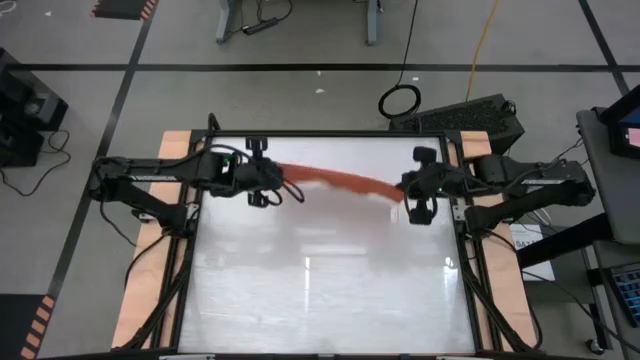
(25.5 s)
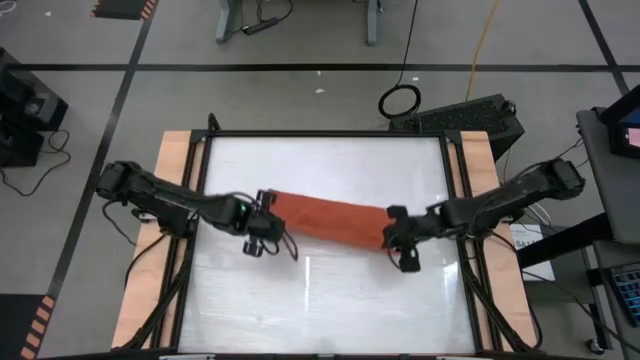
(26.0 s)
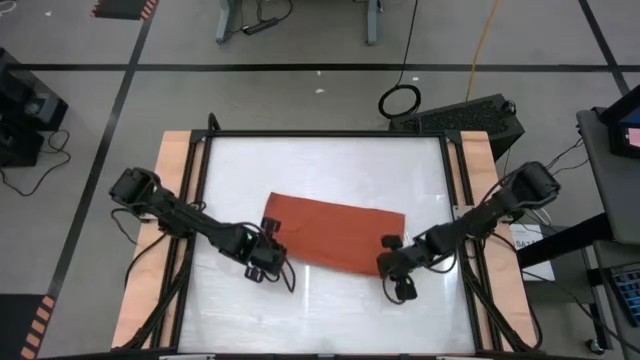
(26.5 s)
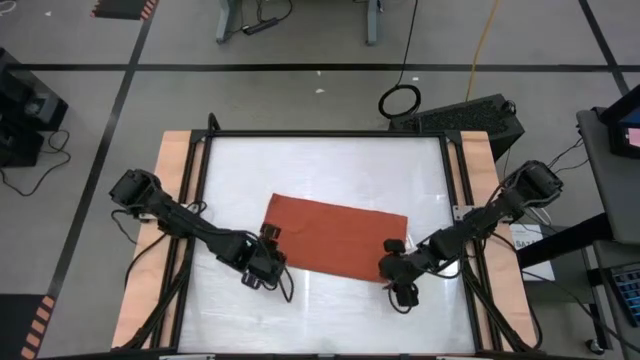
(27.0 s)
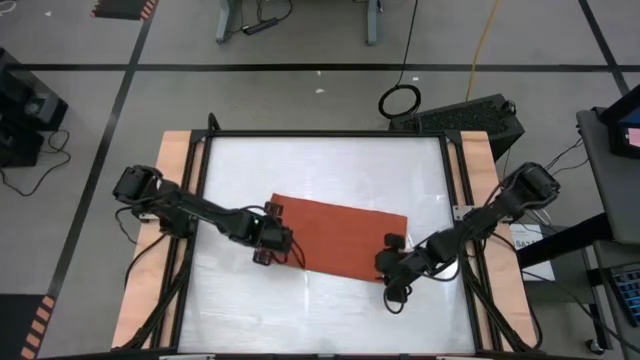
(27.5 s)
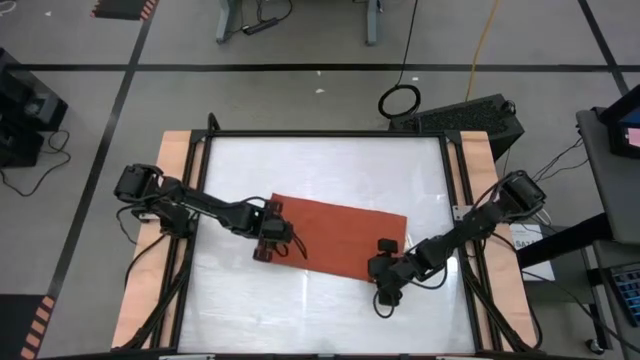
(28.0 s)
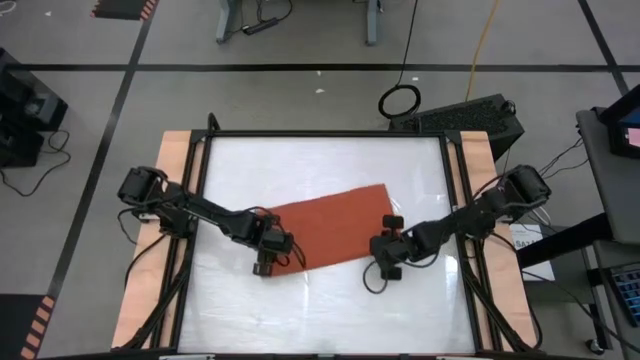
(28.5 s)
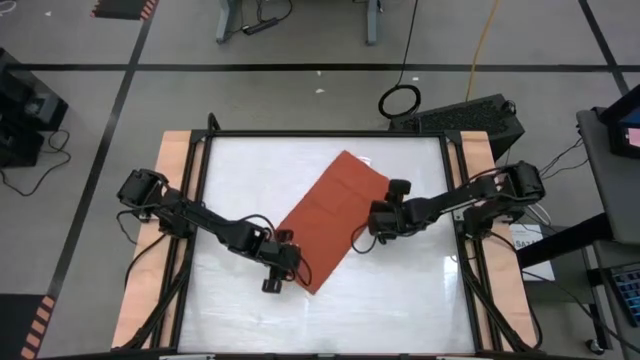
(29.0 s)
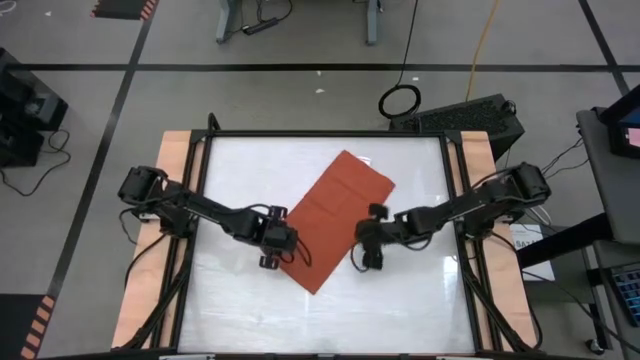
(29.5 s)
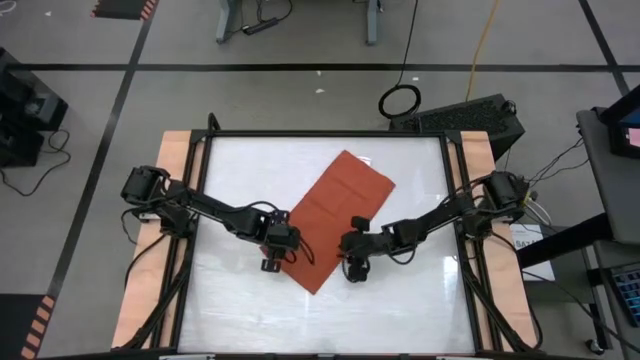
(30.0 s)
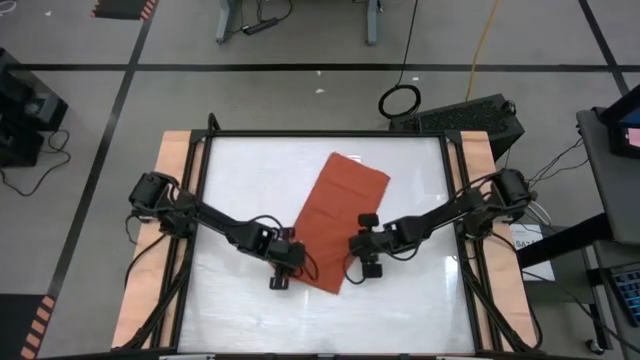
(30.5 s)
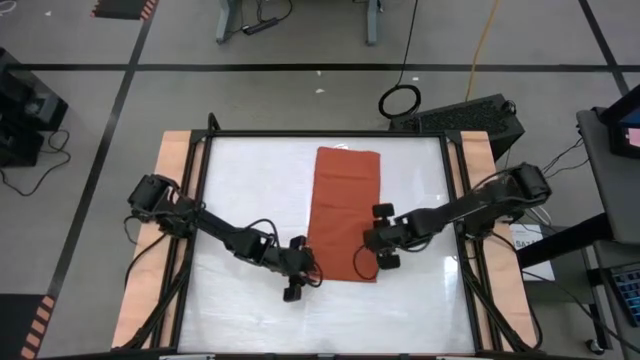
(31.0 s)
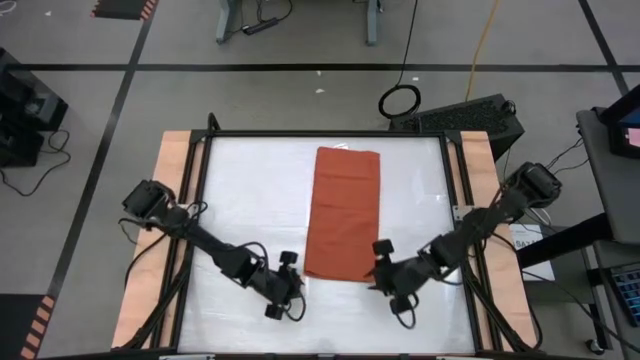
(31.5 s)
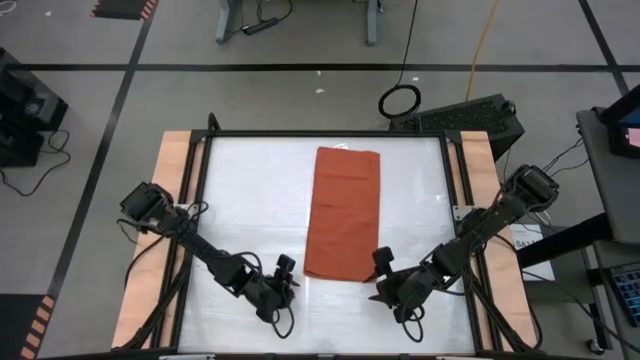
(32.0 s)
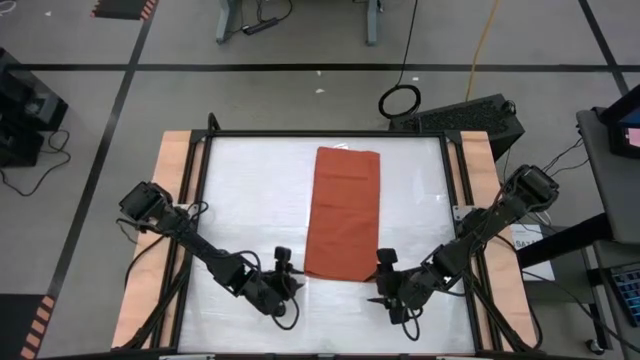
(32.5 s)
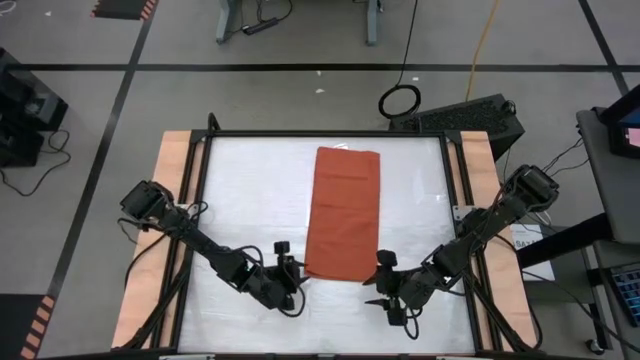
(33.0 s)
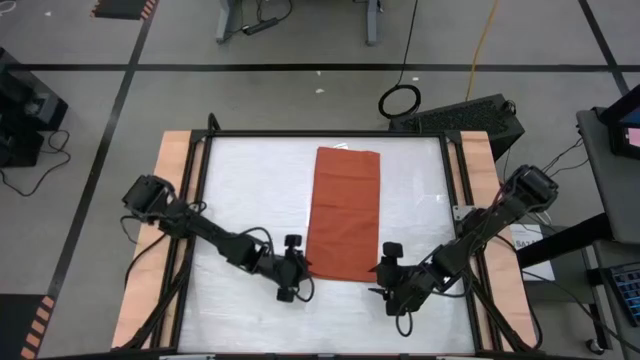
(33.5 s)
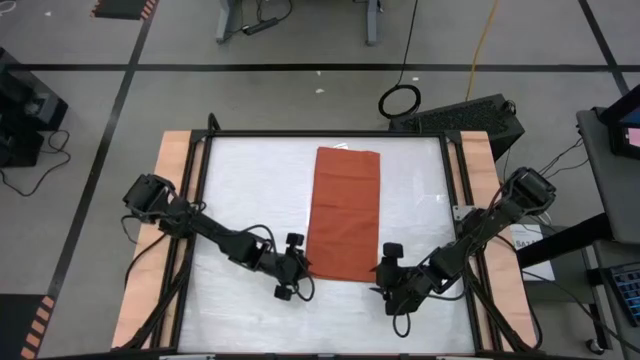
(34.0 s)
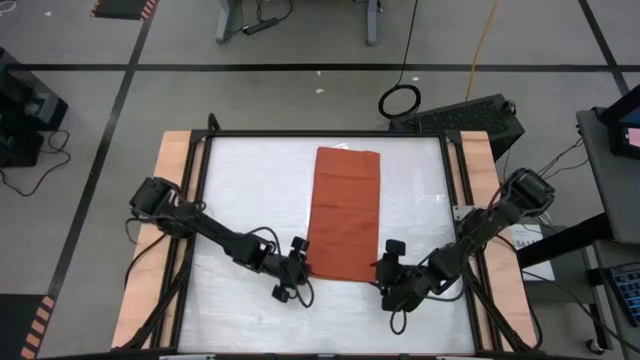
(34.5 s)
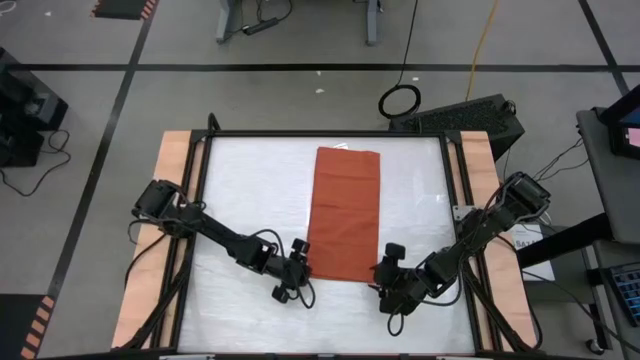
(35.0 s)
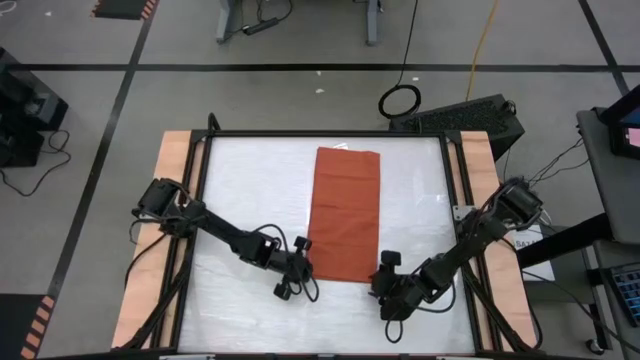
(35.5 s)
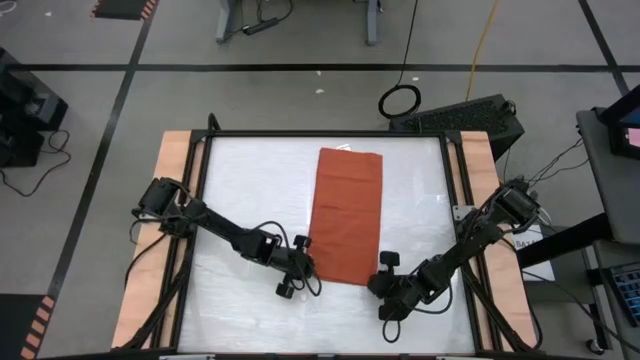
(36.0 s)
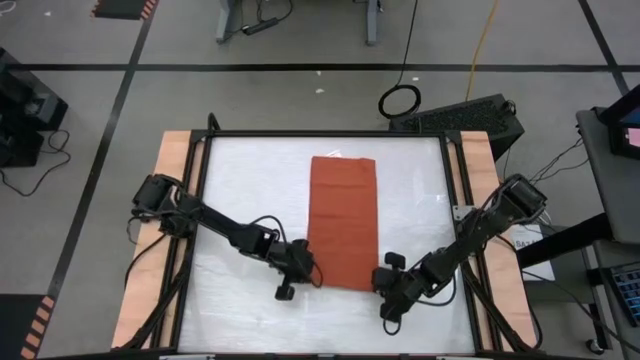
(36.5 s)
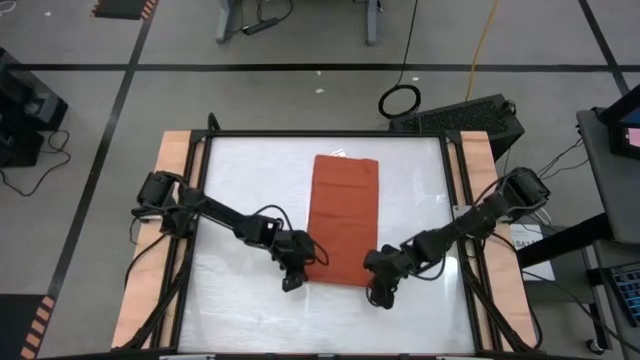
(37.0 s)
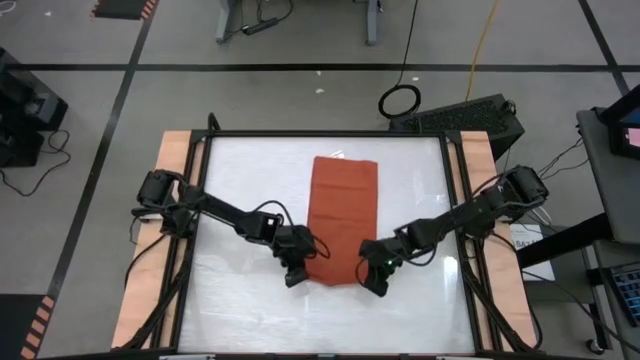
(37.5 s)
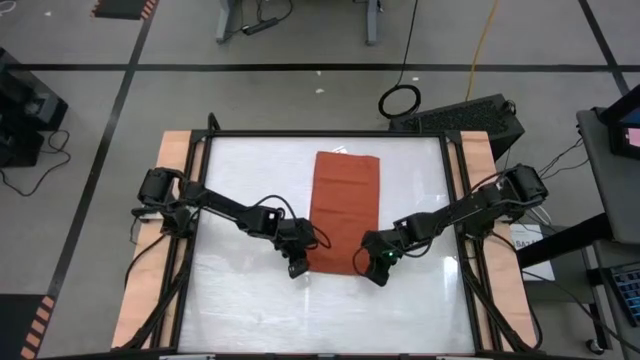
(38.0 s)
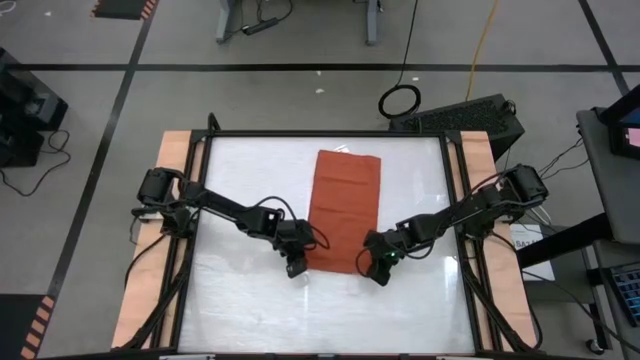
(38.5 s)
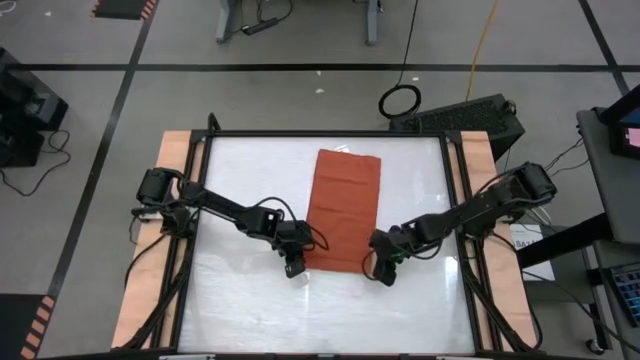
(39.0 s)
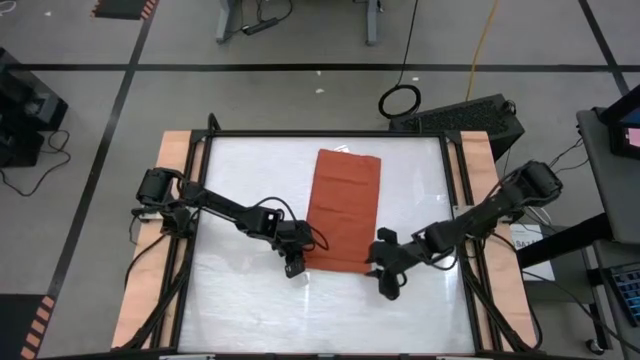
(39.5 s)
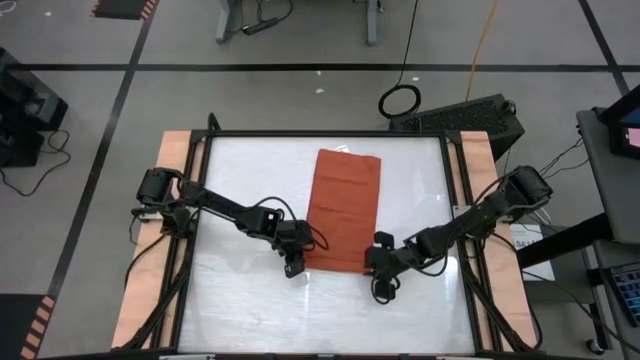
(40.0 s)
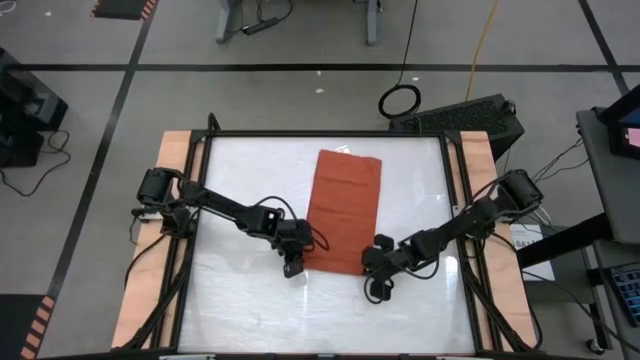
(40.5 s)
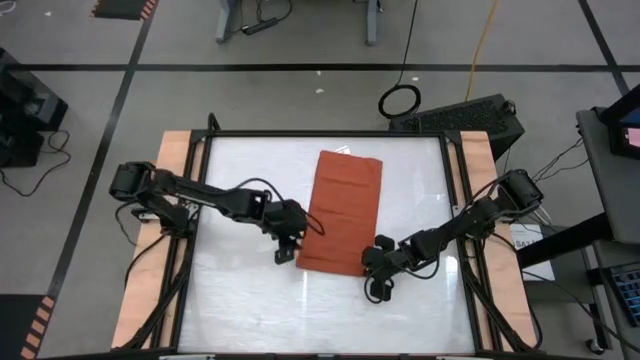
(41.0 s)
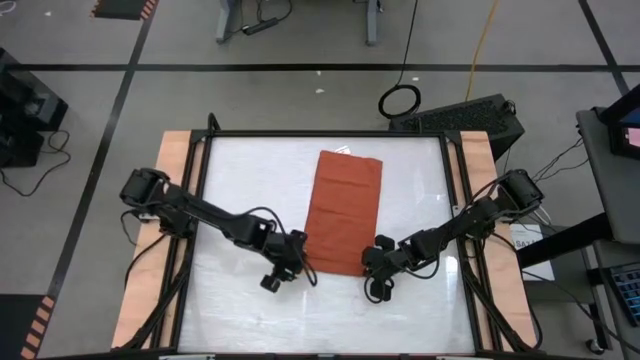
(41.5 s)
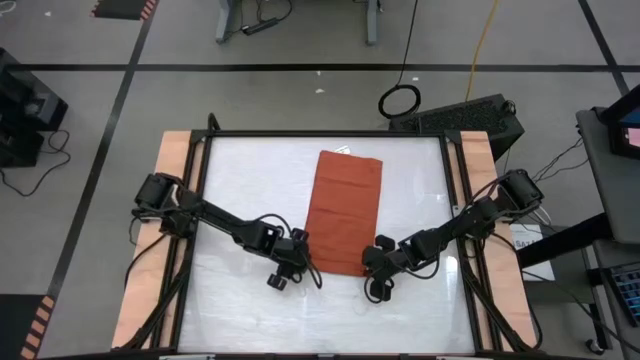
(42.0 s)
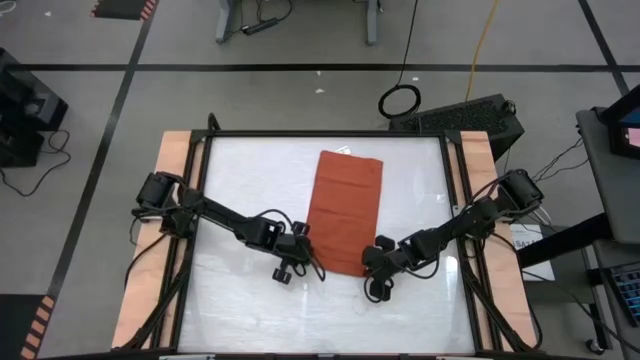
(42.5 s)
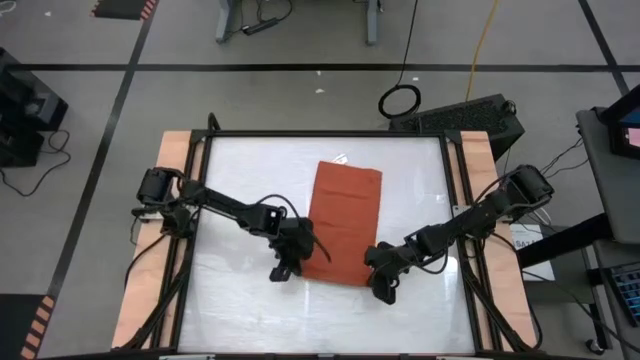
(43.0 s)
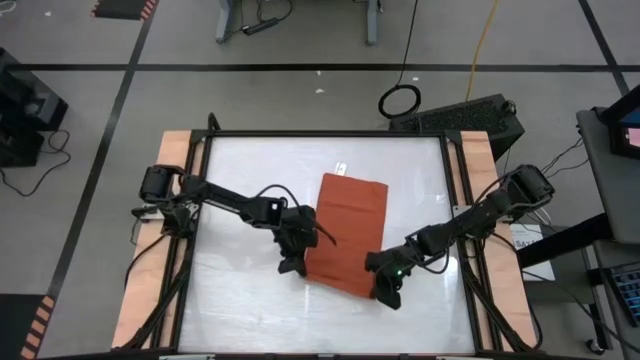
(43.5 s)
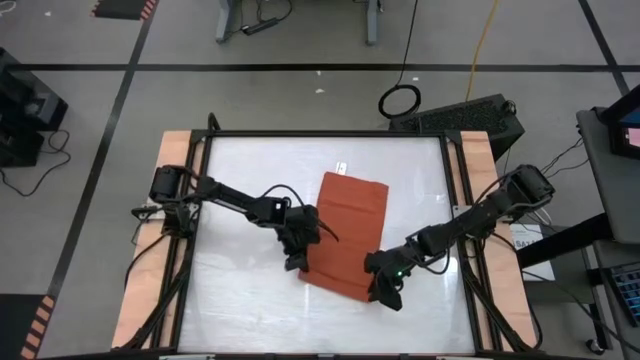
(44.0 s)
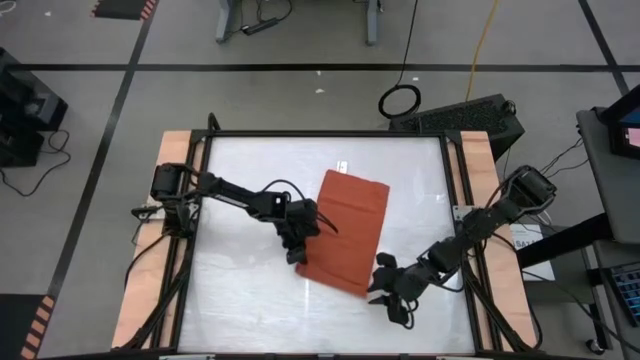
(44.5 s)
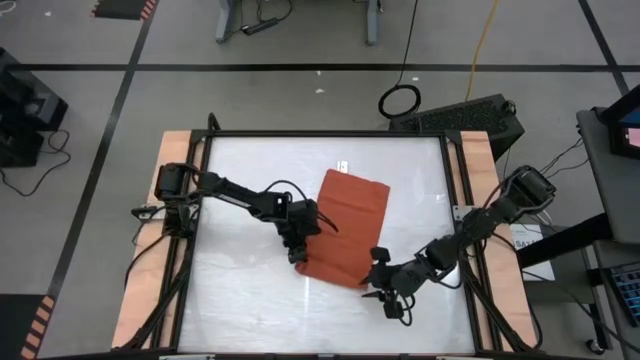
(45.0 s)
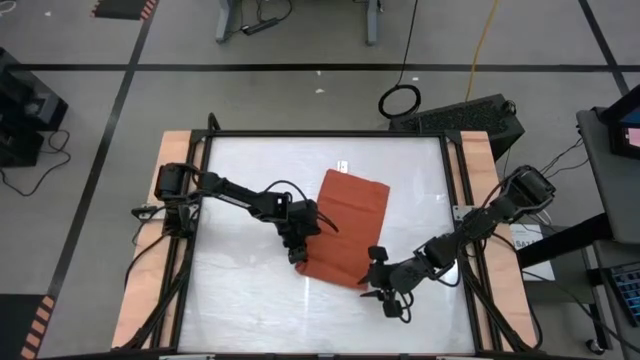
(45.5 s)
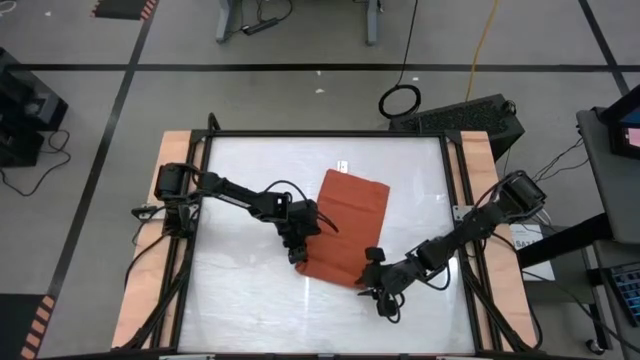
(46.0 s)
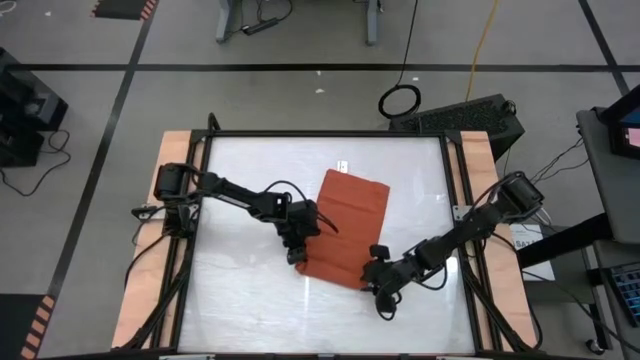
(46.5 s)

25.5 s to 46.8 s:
Task: Roll towel
Roll the orange towel
